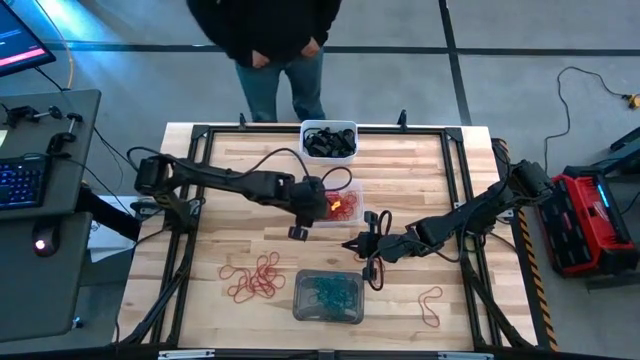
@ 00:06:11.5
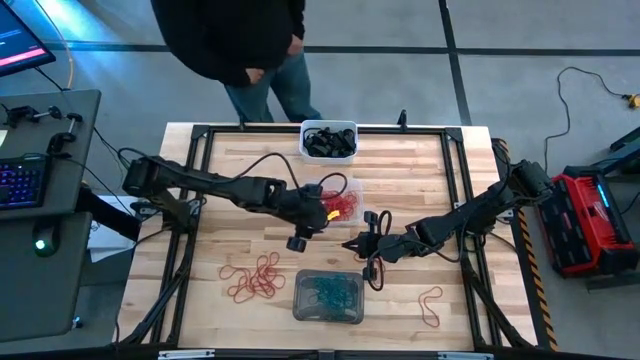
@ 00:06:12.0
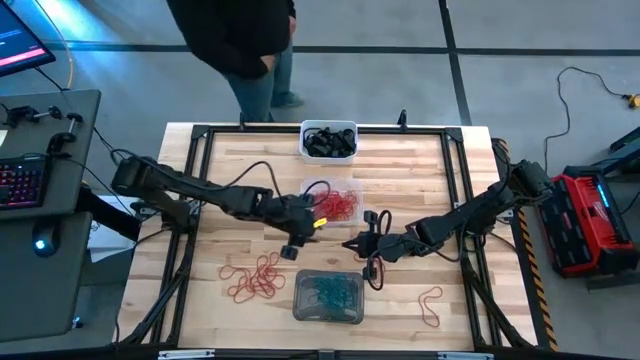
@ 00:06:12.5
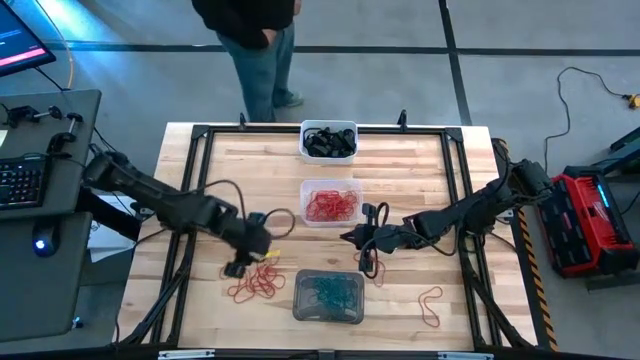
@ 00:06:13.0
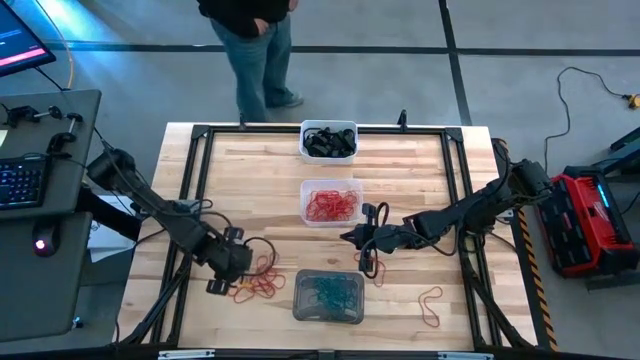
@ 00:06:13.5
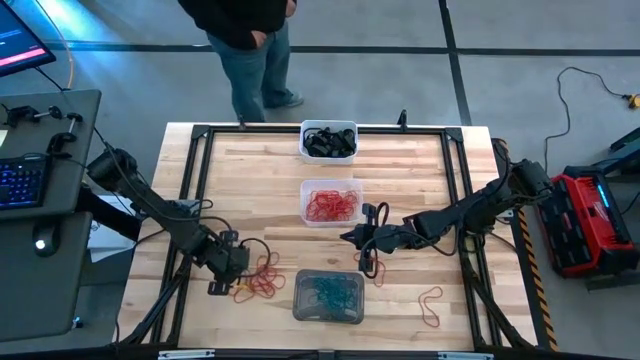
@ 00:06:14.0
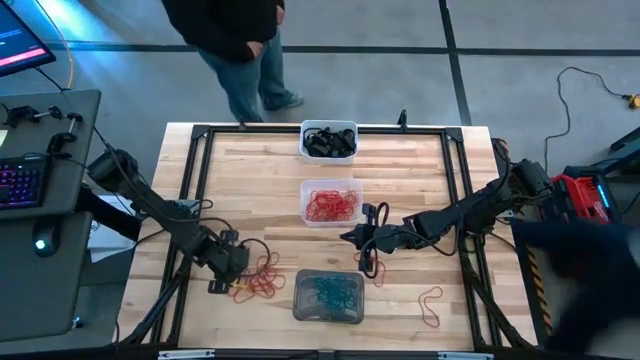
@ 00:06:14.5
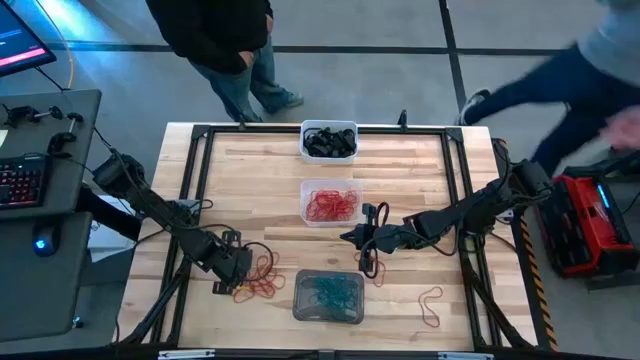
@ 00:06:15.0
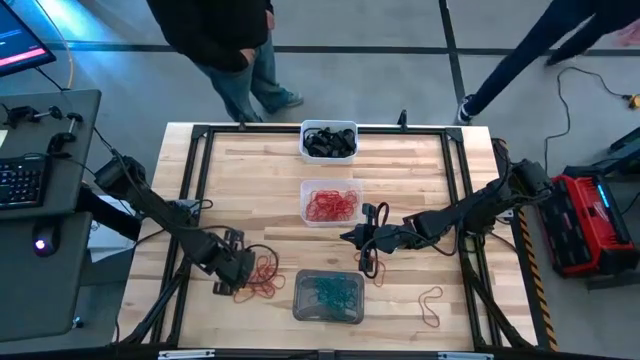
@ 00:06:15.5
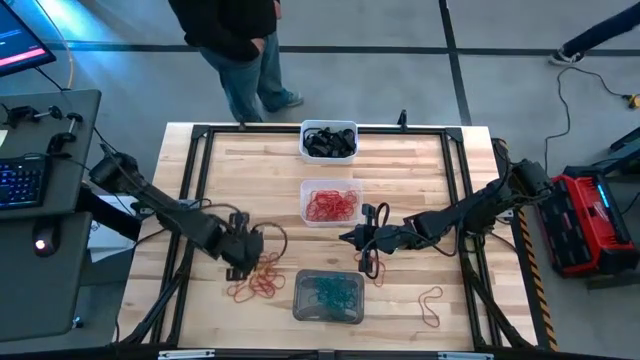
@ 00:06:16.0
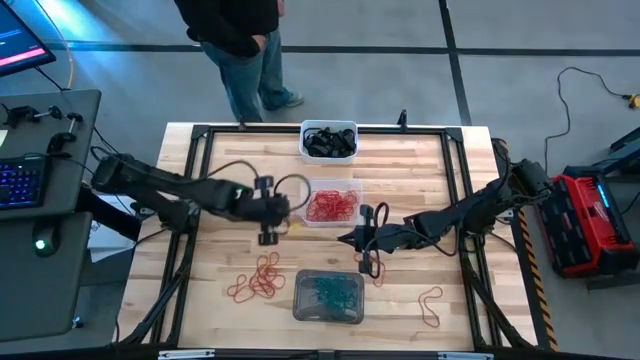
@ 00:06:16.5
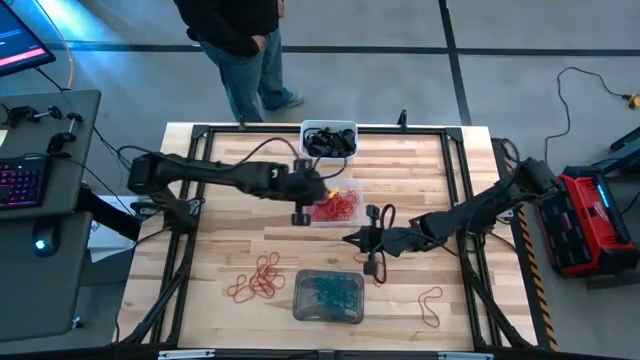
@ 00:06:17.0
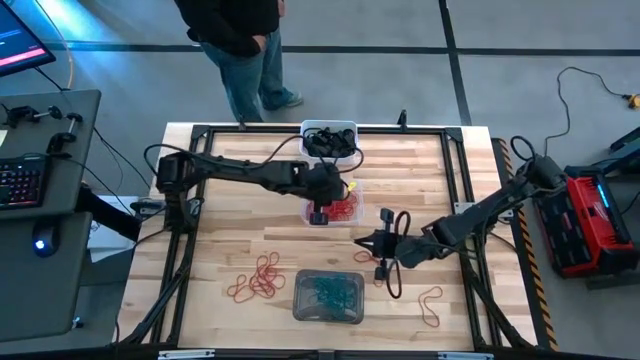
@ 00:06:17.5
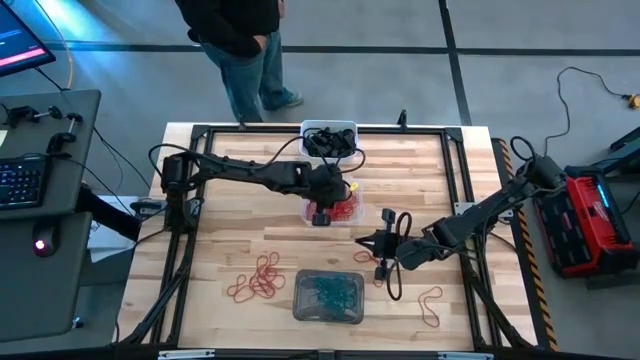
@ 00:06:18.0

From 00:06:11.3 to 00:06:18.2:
Task: Sort rubber bands into baskets
Put the red rubber band into the transparent bin

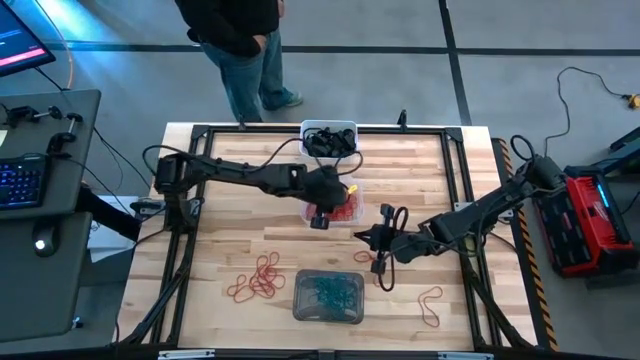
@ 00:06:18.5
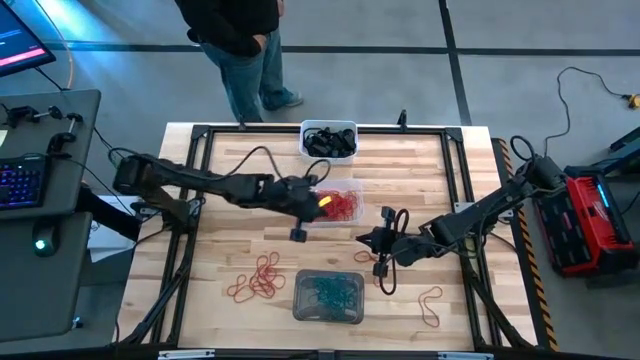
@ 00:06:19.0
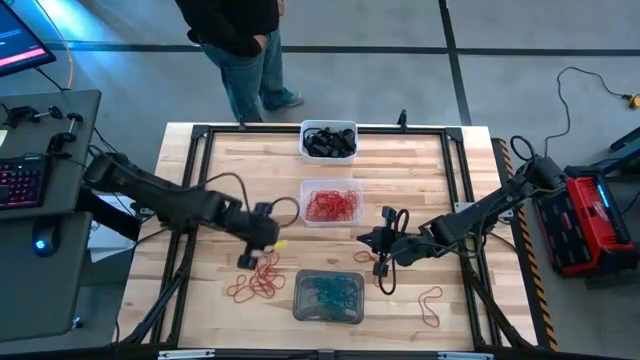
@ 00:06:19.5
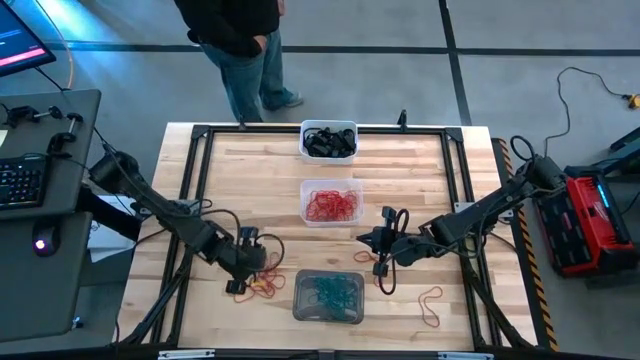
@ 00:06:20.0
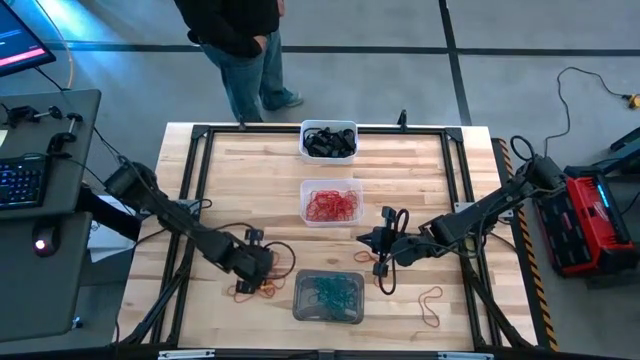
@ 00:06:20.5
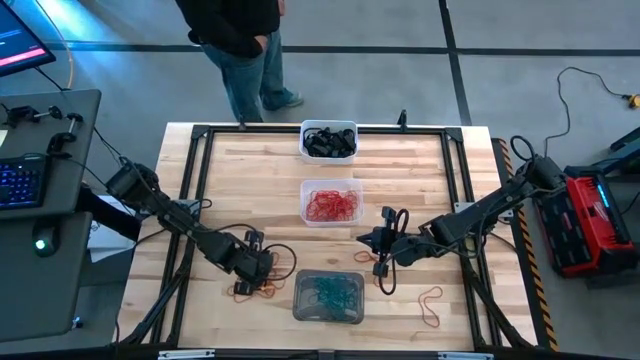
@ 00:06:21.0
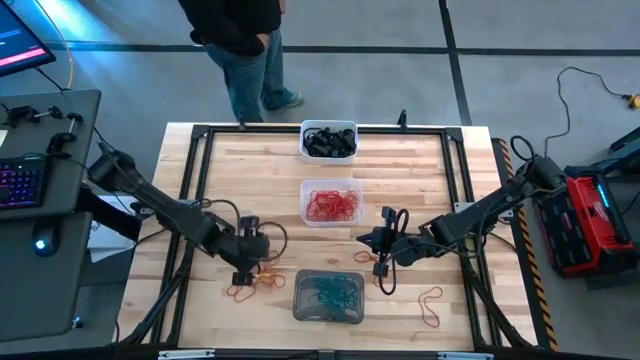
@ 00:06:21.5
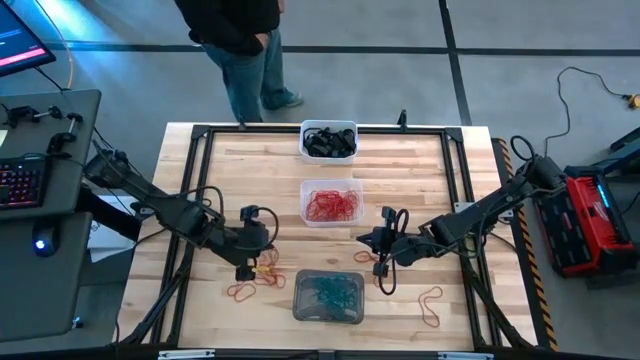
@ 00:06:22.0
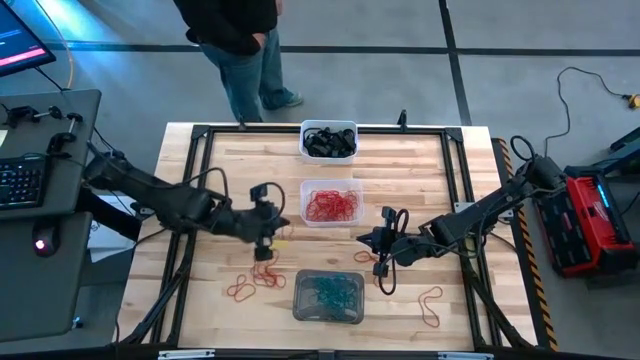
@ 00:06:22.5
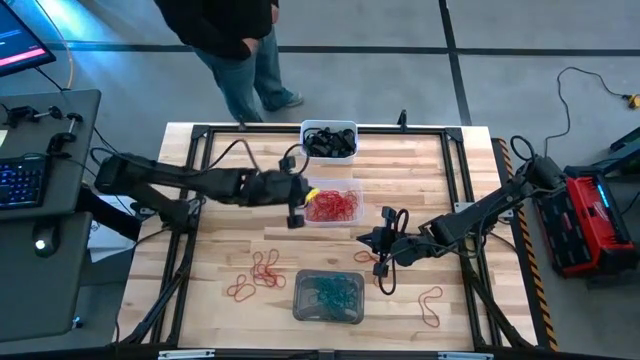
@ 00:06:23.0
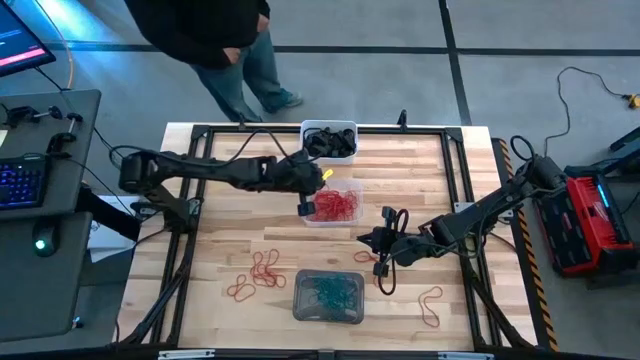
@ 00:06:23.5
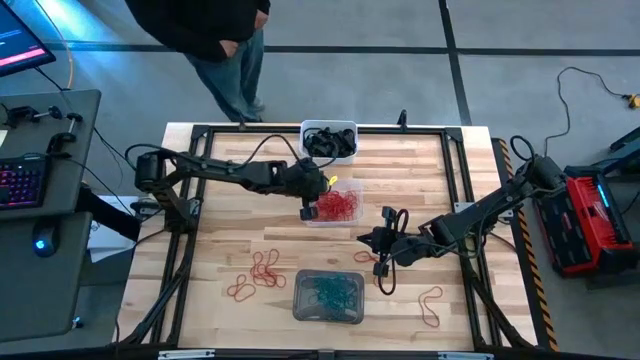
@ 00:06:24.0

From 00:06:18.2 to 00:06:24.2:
Put the red rubber band into the transparent bin

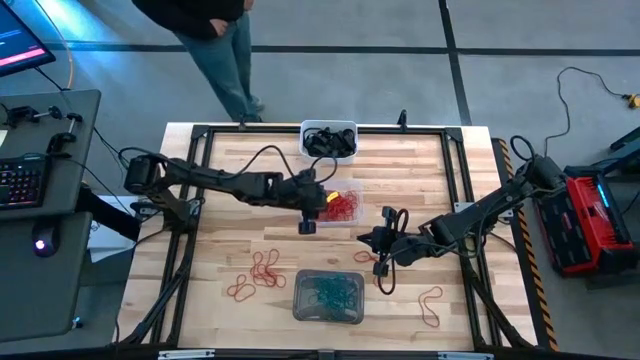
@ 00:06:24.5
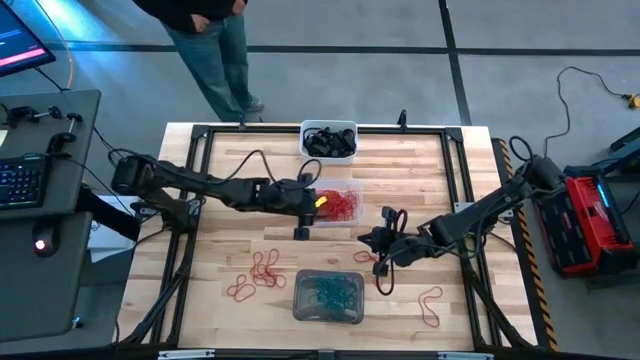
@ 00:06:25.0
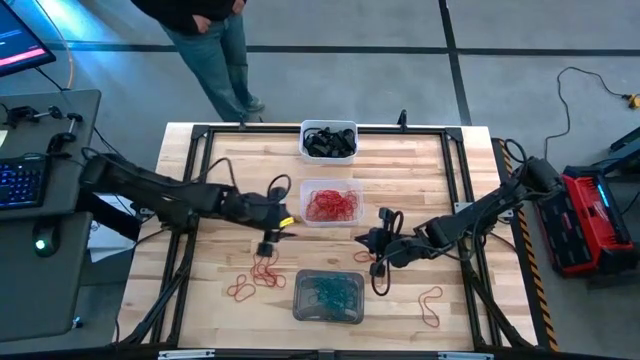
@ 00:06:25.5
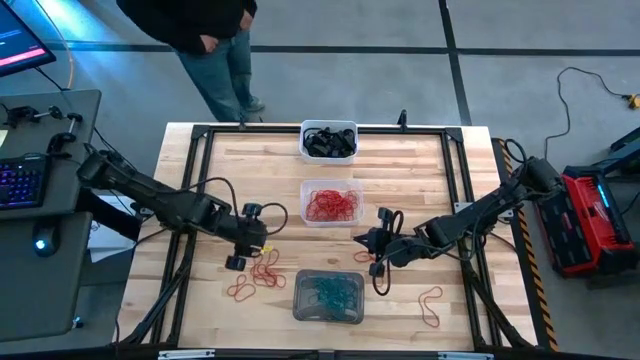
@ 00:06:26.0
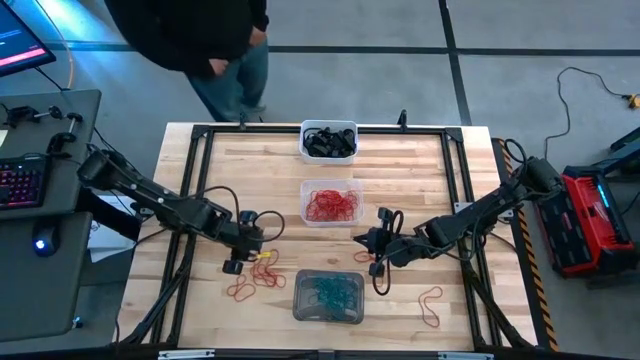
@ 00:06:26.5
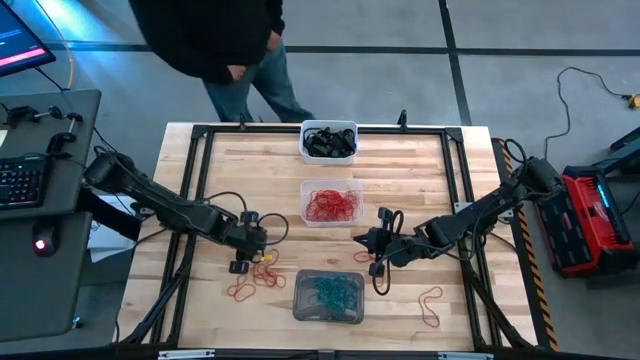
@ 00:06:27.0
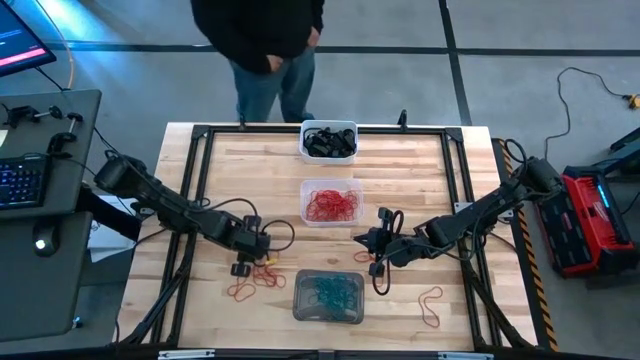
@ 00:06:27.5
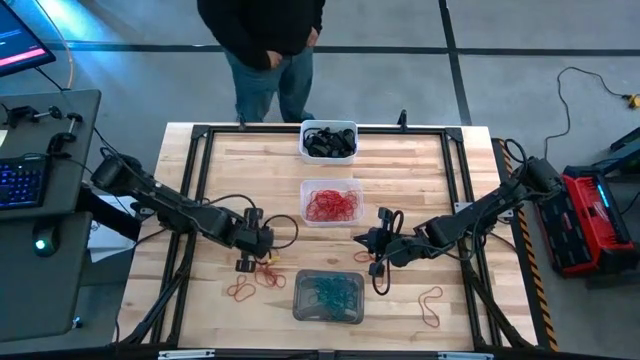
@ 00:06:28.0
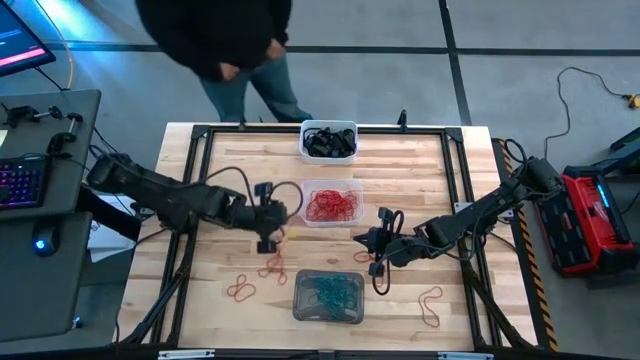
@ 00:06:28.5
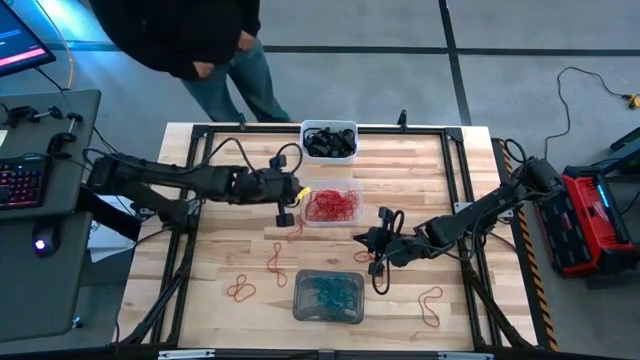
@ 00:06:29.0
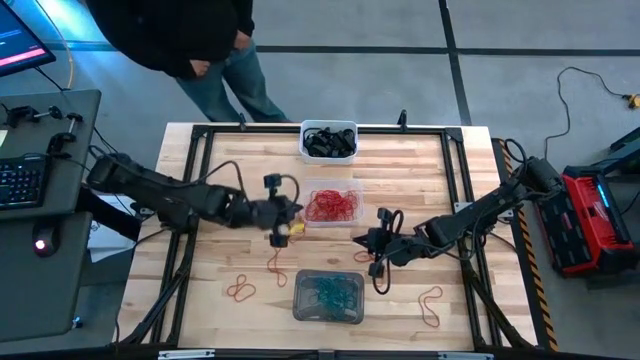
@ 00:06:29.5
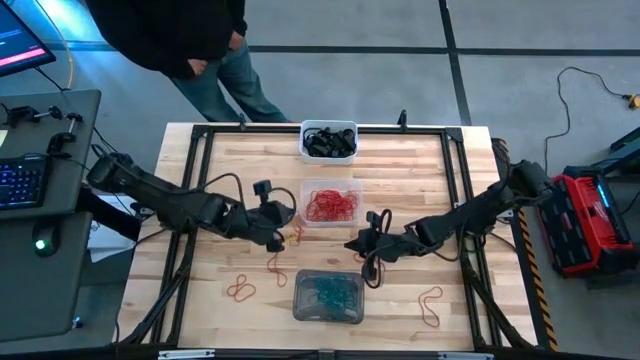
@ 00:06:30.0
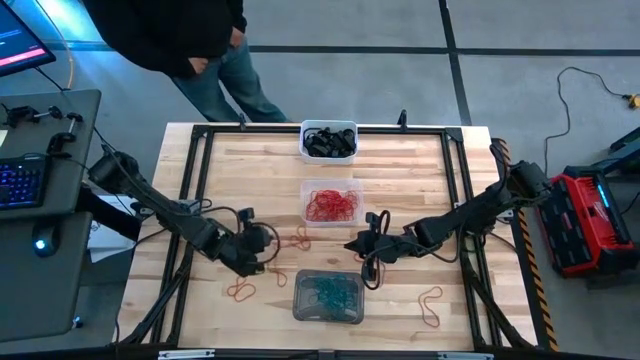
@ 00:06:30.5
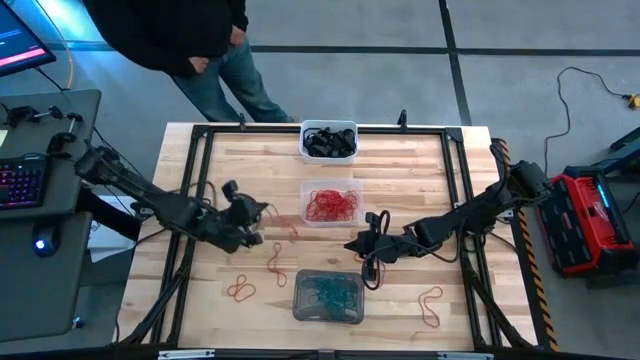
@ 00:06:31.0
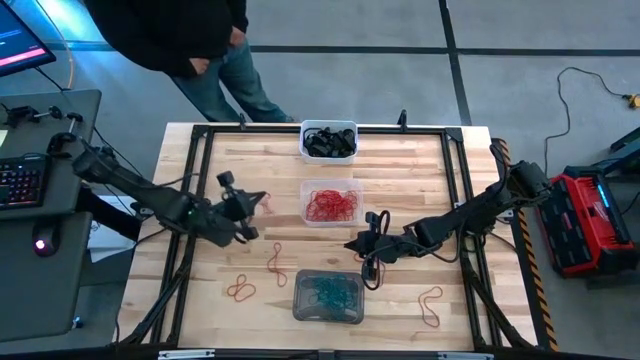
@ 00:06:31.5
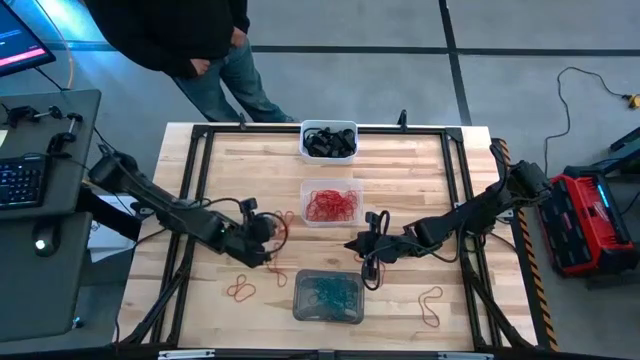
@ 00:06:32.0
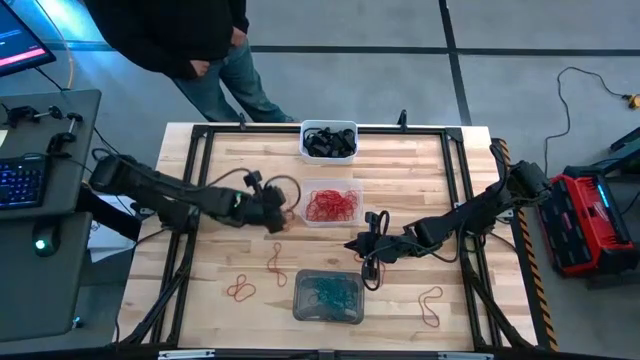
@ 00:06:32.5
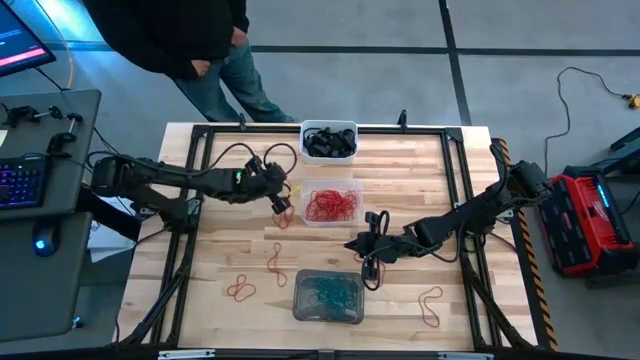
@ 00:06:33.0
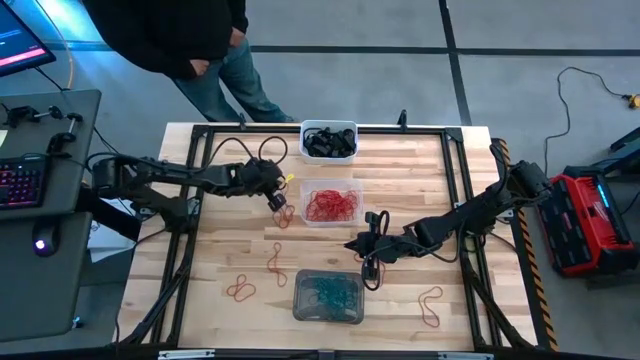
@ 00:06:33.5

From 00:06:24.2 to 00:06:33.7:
Put the red rubber band into the transparent bin
